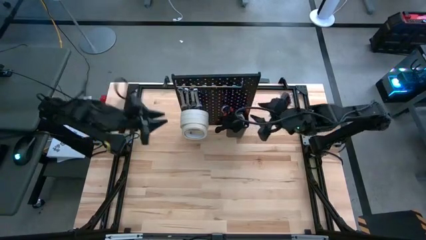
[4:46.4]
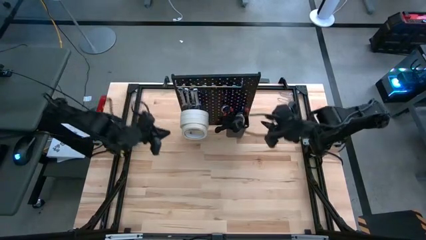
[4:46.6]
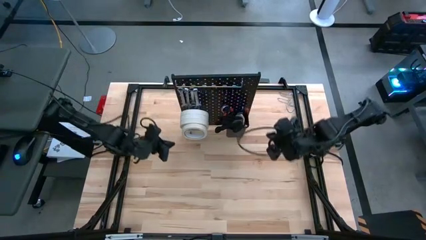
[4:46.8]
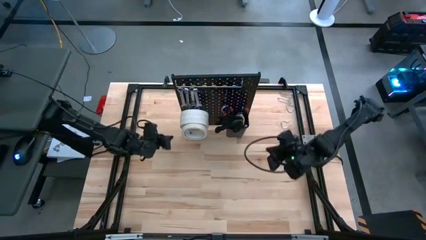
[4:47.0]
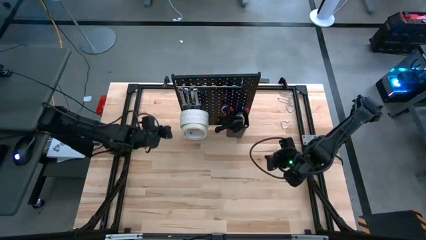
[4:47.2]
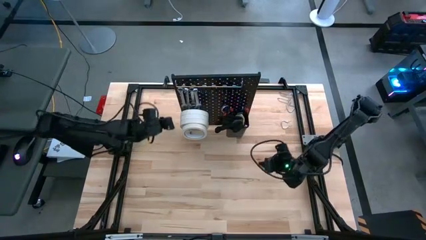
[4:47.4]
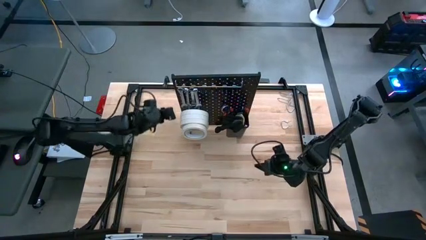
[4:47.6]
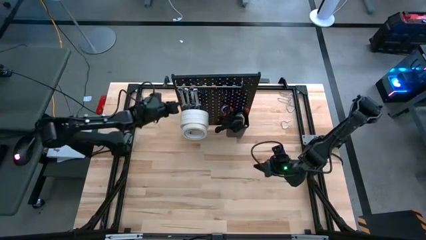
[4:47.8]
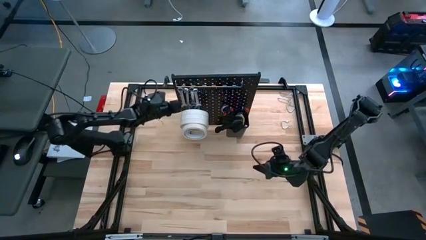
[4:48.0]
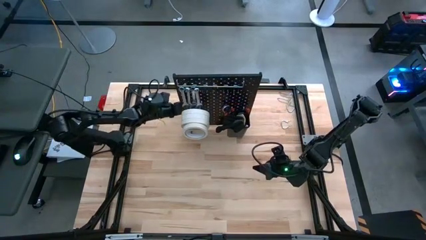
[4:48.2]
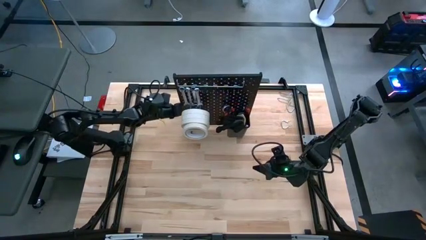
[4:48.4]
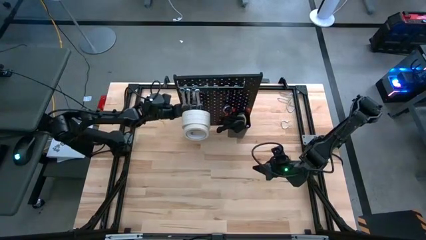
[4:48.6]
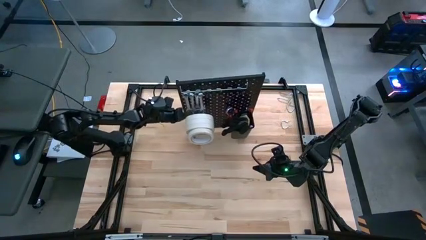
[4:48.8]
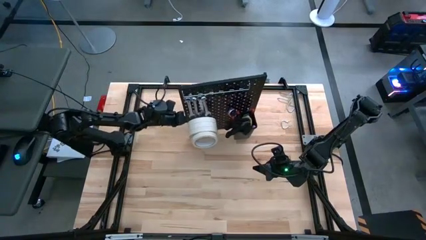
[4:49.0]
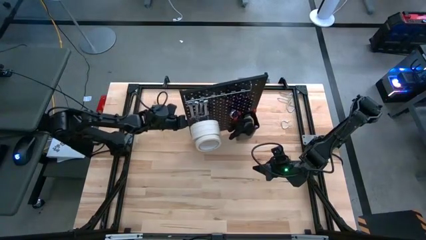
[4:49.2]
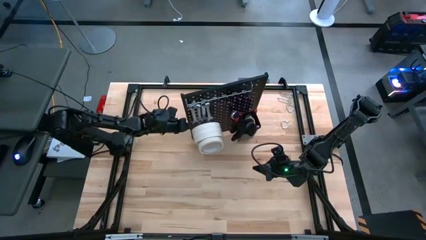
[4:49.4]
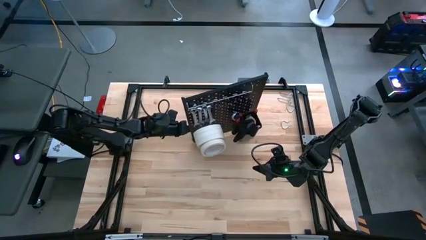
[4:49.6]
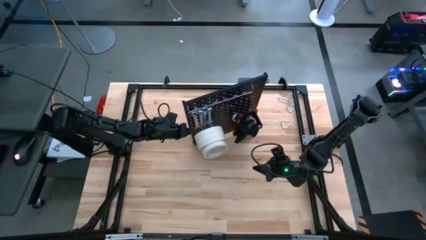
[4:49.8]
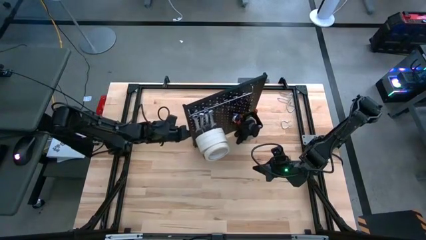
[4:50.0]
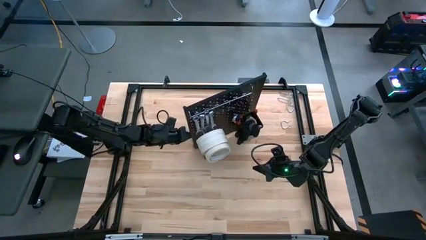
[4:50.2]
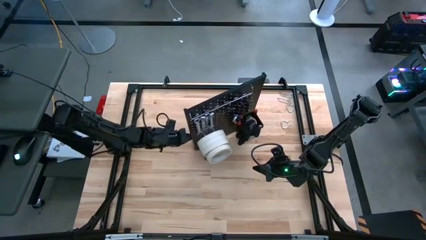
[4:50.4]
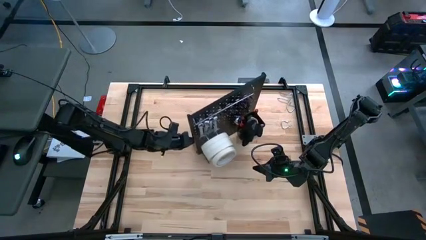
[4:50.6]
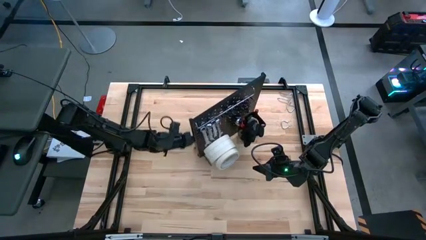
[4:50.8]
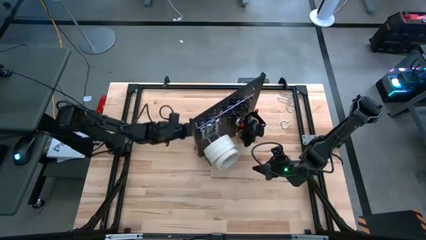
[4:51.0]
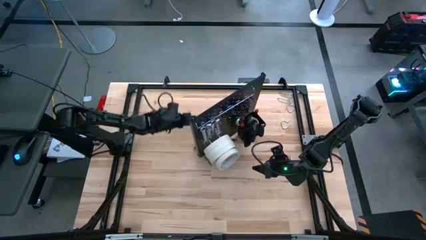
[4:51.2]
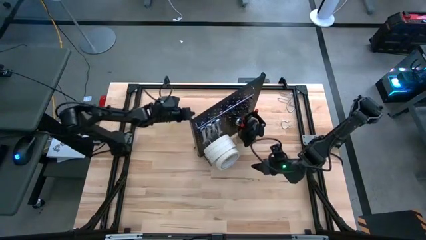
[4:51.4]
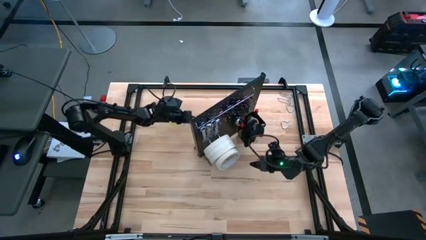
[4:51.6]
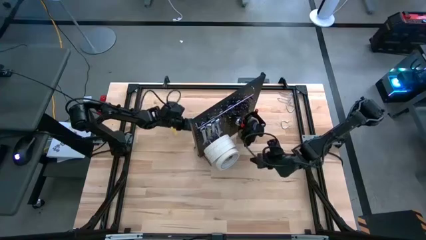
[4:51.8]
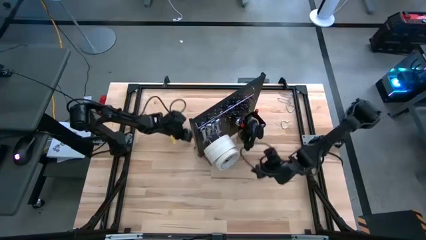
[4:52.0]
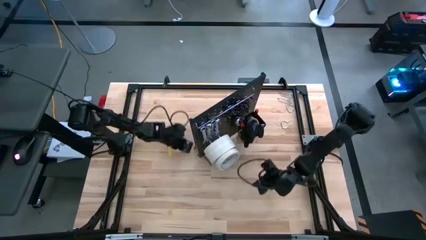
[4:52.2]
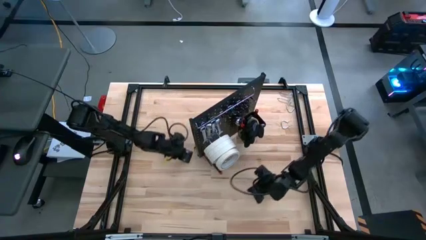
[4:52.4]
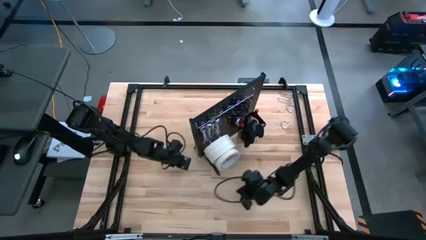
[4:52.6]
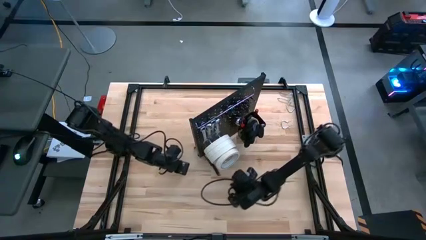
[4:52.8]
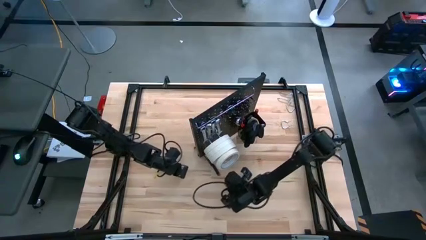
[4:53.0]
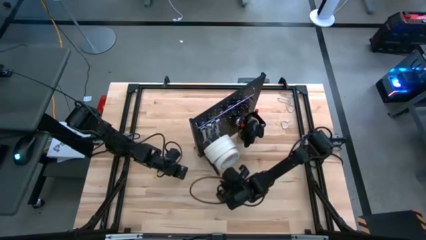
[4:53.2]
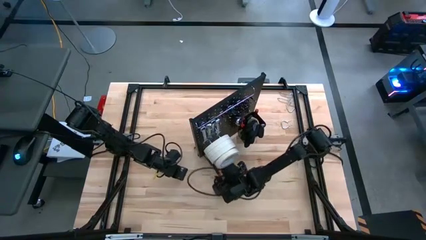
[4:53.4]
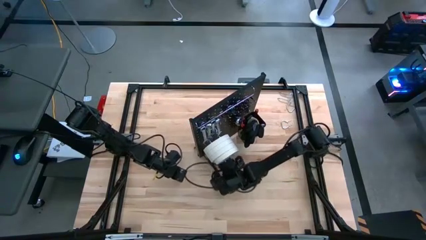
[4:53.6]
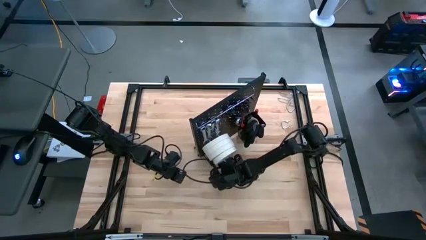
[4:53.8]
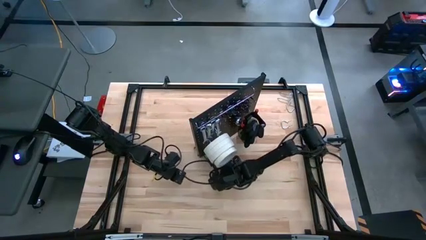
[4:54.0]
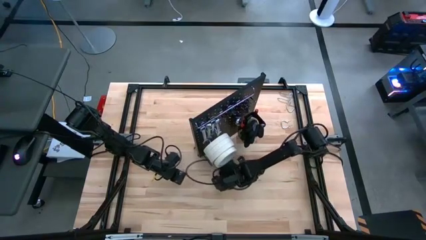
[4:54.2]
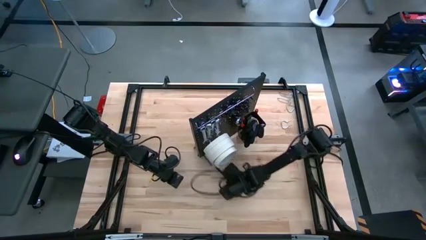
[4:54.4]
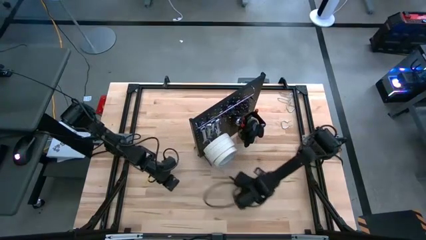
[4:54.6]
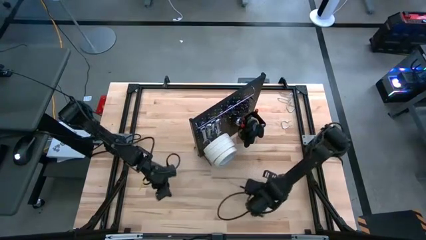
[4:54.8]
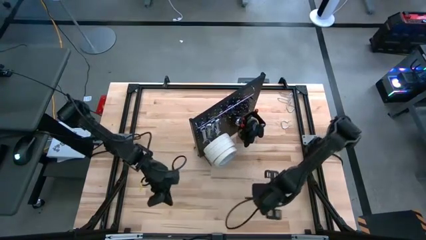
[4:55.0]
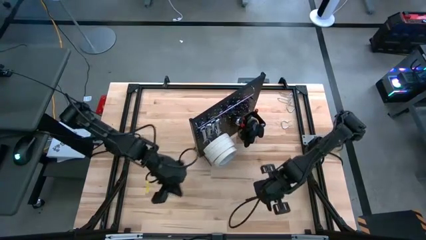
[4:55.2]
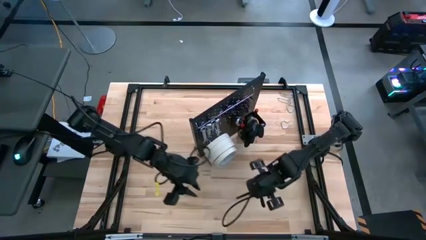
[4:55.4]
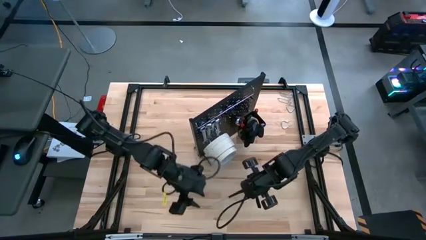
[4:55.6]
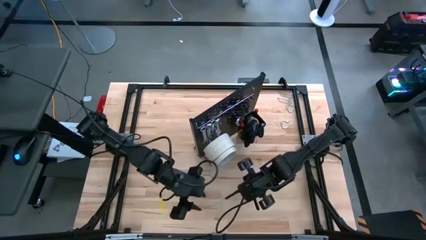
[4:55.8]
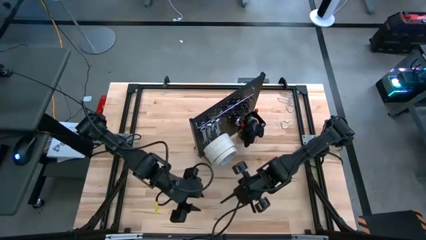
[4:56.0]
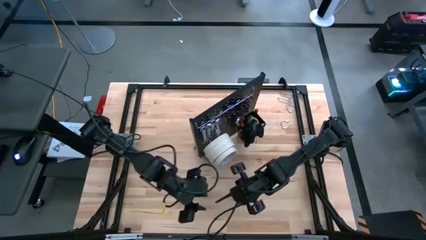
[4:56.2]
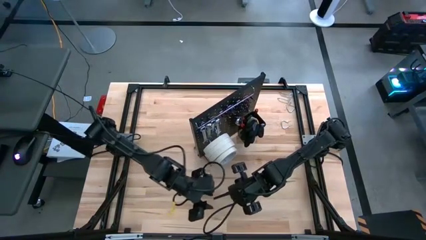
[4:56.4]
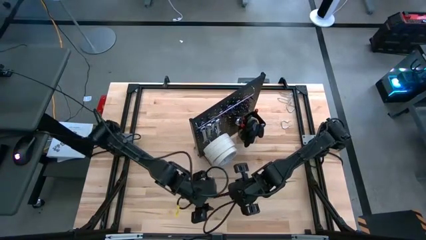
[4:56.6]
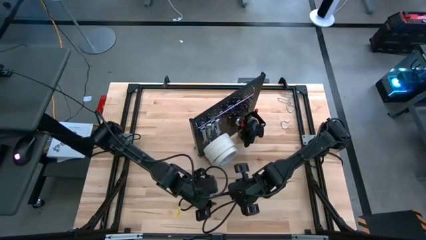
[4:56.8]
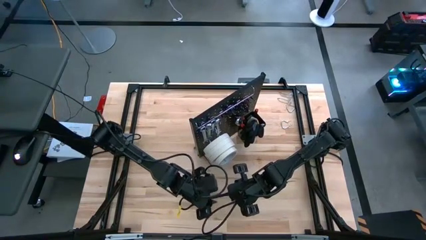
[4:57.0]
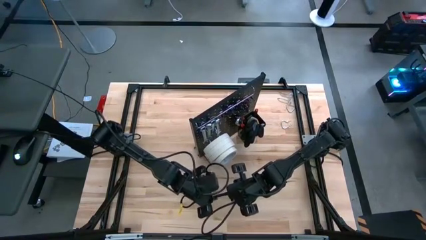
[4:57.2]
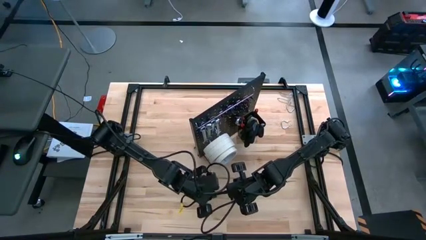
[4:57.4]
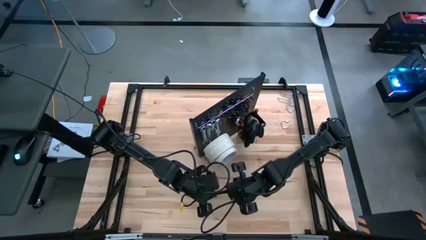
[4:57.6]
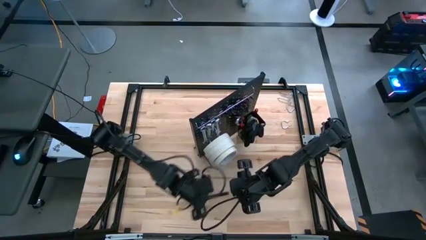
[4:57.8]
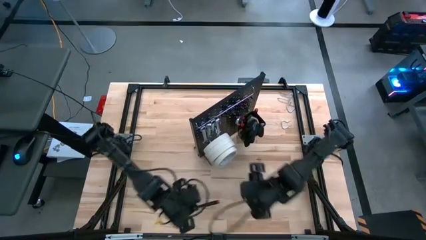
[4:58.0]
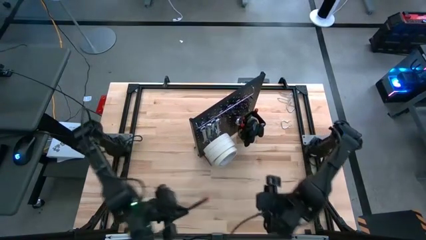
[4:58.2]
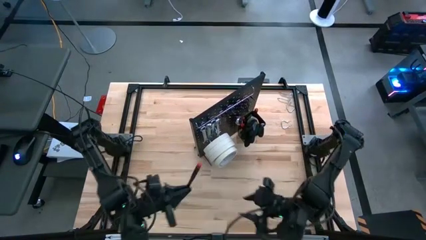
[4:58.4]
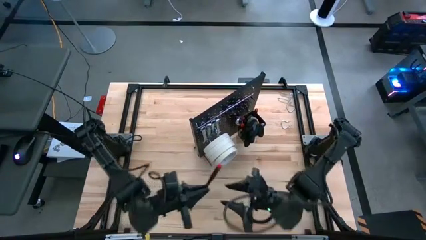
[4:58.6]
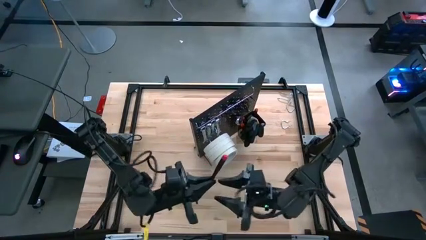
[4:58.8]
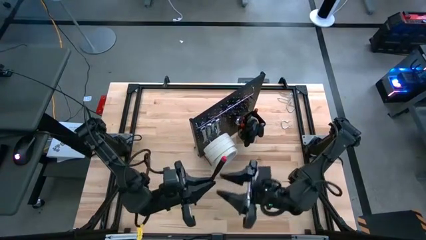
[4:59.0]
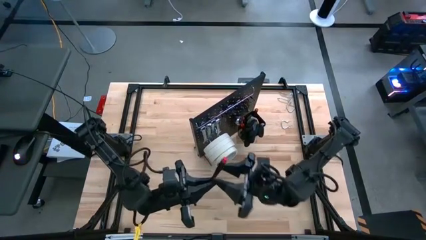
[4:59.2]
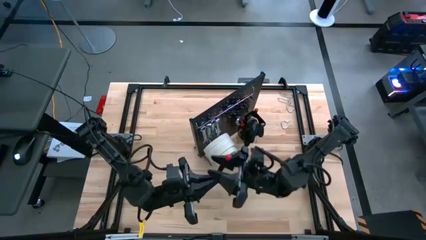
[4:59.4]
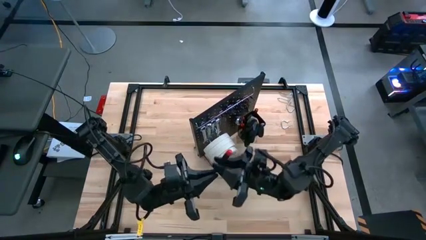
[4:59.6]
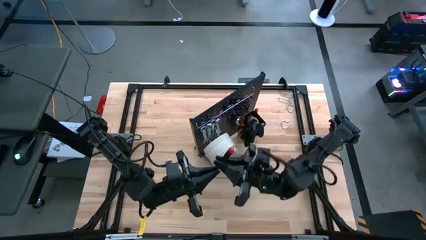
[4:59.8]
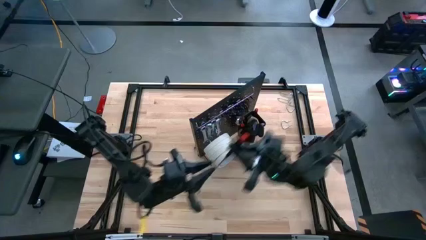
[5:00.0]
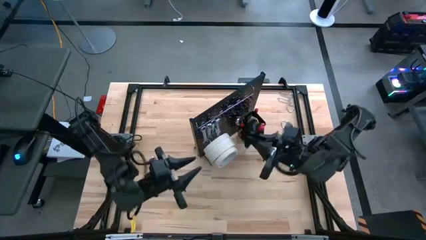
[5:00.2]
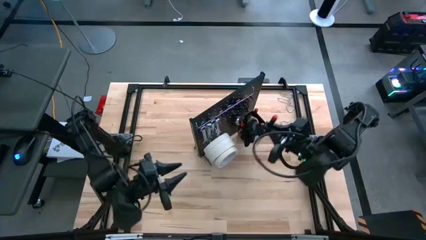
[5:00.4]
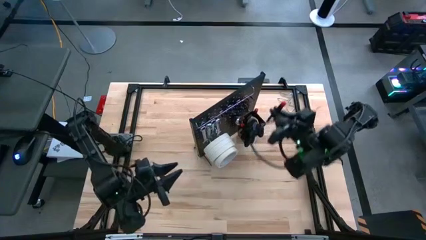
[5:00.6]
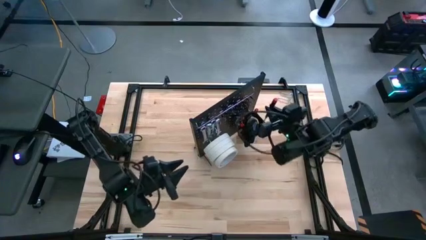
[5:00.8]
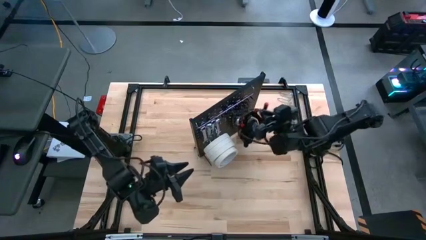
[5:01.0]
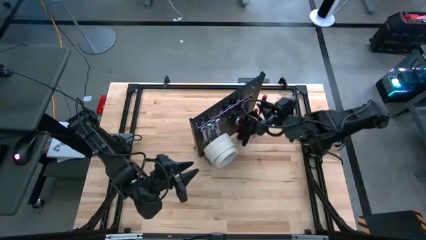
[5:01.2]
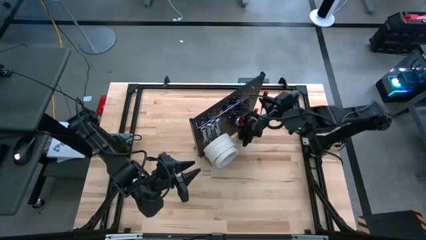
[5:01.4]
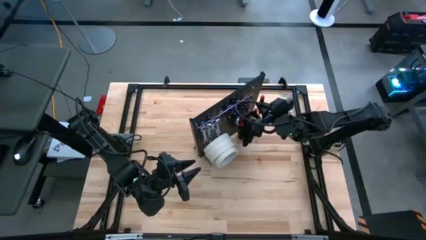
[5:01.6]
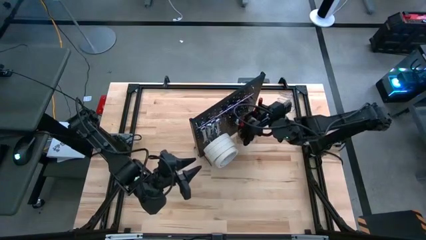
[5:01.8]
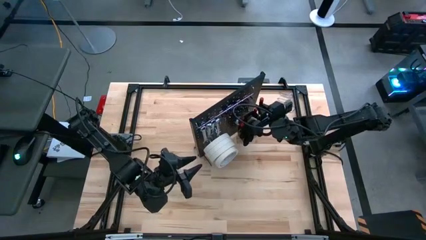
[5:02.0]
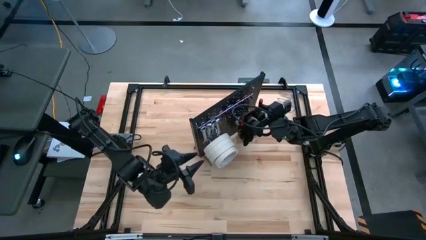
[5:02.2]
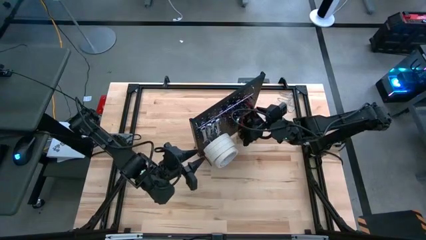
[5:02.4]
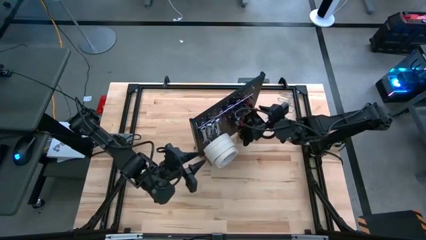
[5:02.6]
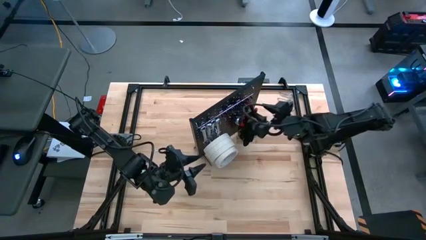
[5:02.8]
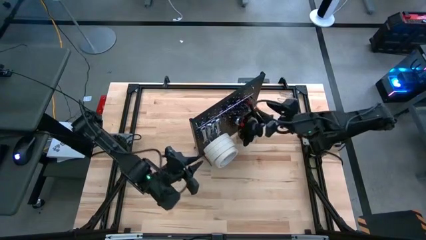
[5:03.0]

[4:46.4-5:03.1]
Task: Hang tools onto peg board
Hang the screw tool onto the pegboard
